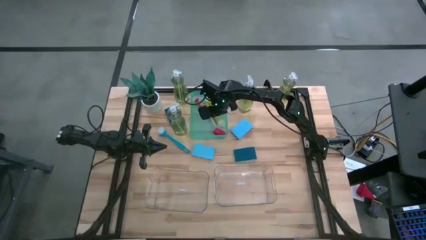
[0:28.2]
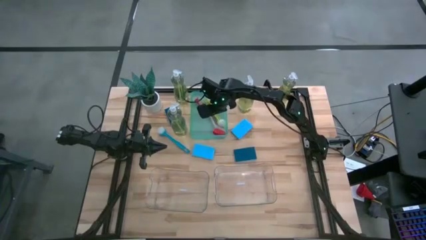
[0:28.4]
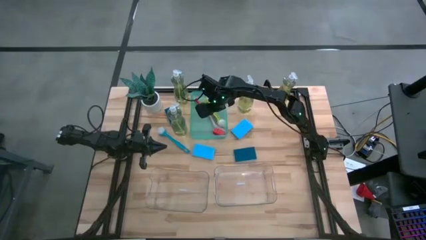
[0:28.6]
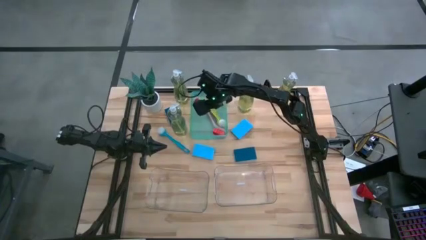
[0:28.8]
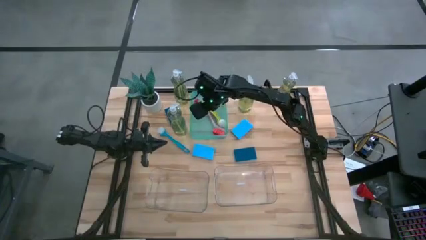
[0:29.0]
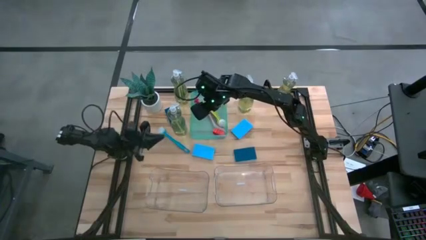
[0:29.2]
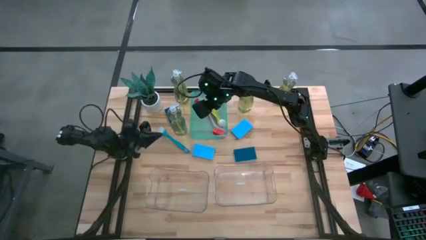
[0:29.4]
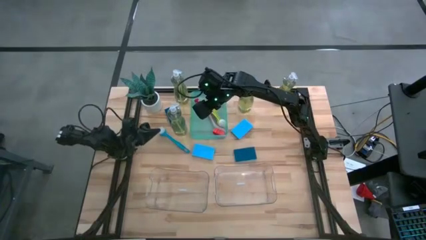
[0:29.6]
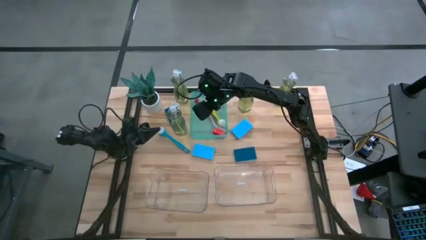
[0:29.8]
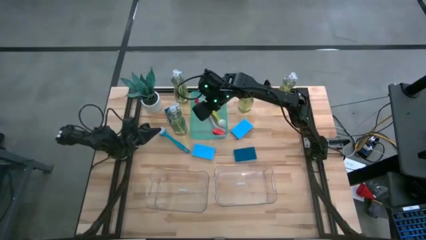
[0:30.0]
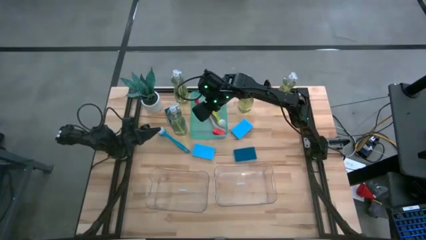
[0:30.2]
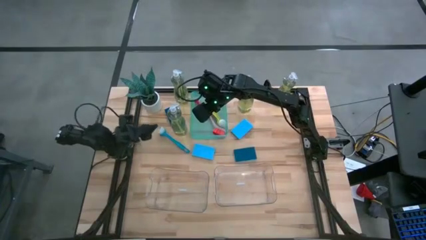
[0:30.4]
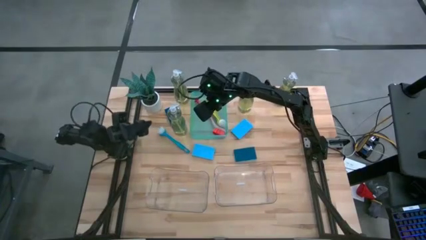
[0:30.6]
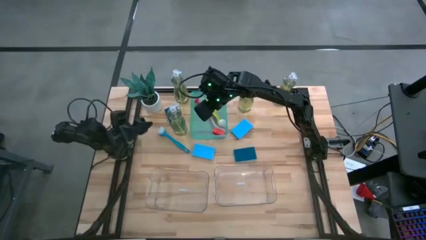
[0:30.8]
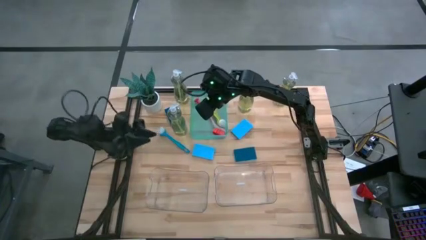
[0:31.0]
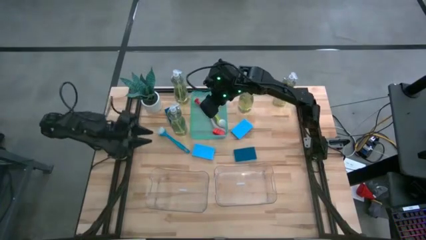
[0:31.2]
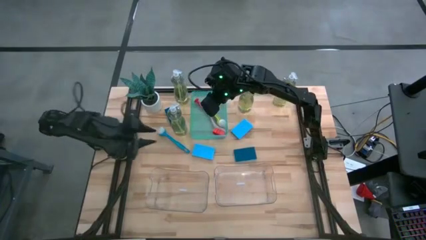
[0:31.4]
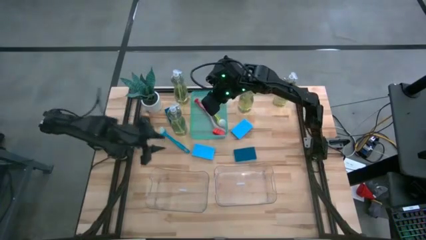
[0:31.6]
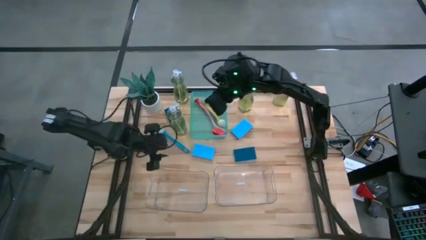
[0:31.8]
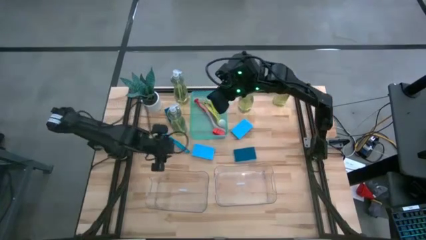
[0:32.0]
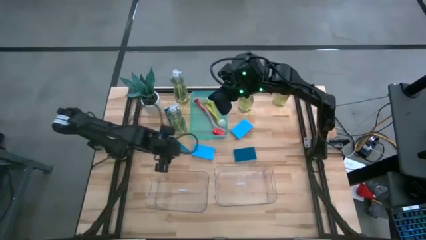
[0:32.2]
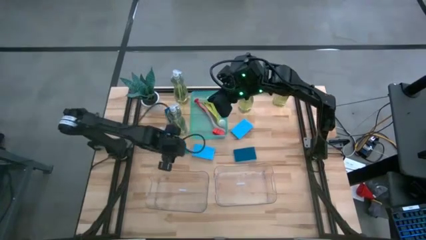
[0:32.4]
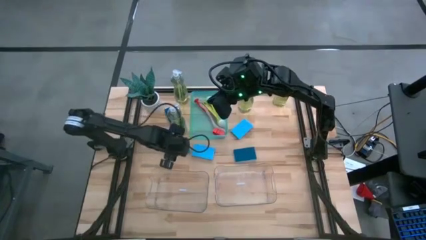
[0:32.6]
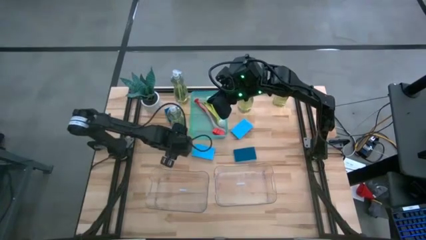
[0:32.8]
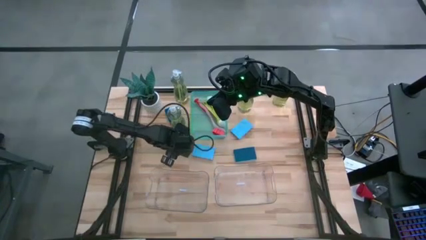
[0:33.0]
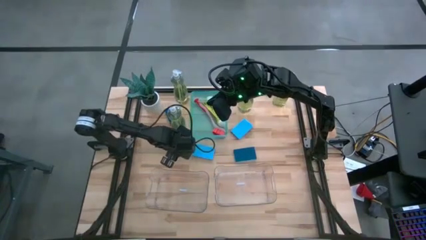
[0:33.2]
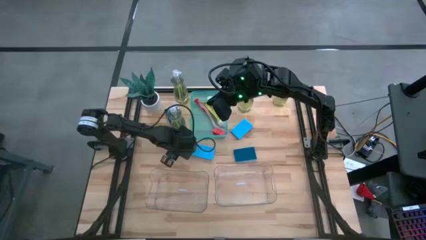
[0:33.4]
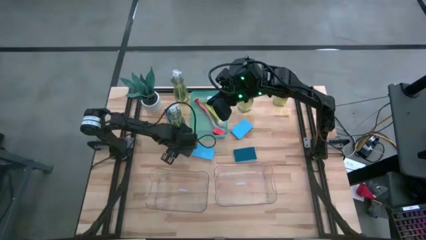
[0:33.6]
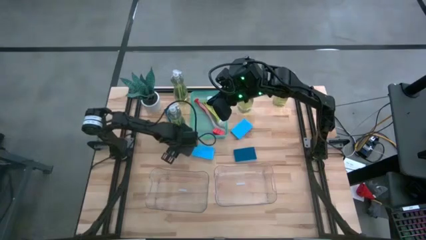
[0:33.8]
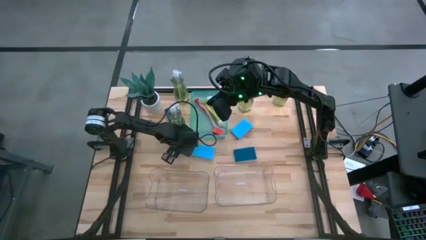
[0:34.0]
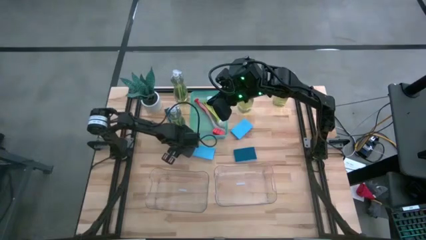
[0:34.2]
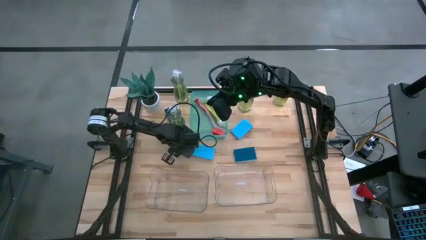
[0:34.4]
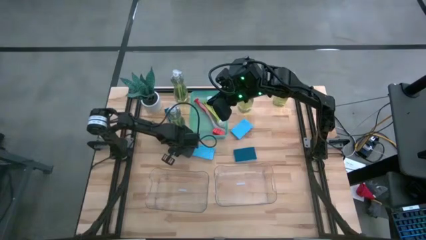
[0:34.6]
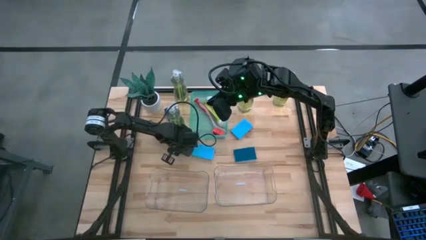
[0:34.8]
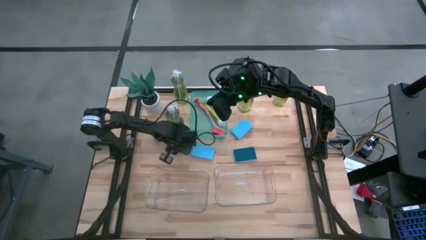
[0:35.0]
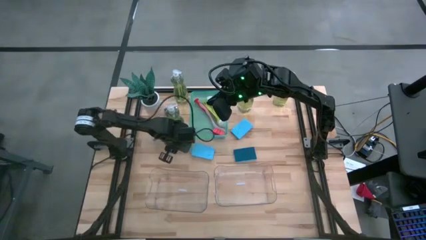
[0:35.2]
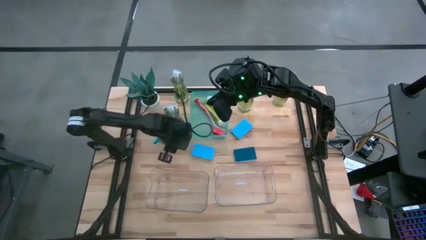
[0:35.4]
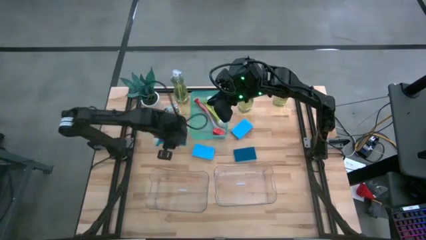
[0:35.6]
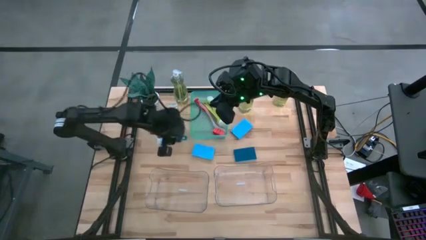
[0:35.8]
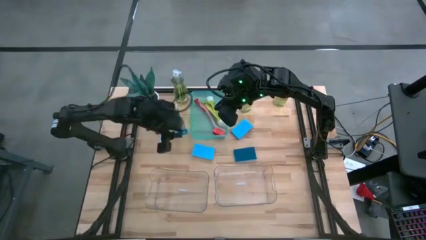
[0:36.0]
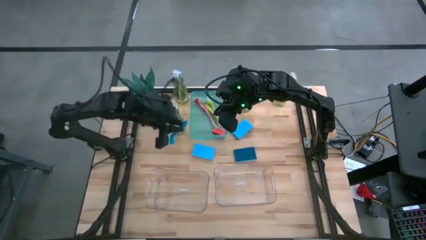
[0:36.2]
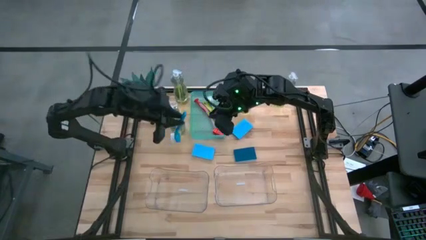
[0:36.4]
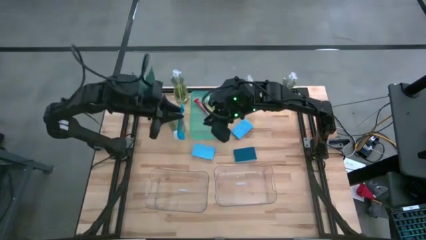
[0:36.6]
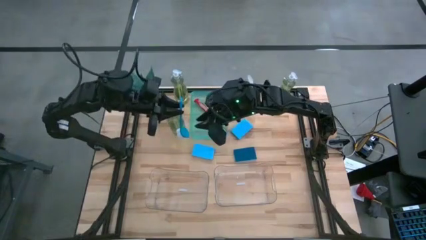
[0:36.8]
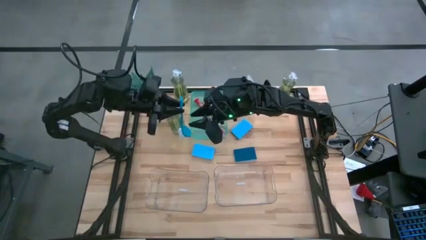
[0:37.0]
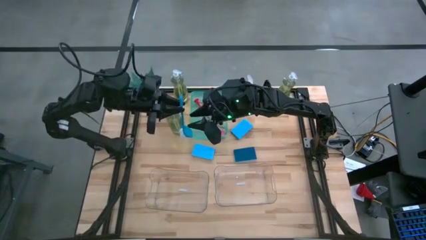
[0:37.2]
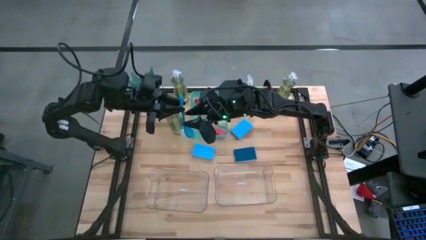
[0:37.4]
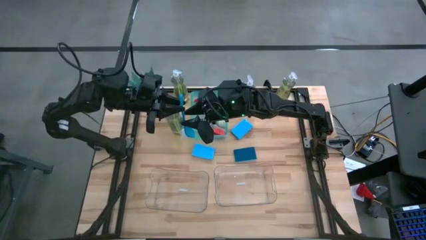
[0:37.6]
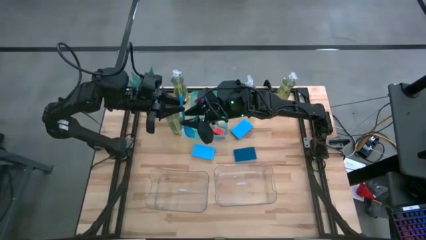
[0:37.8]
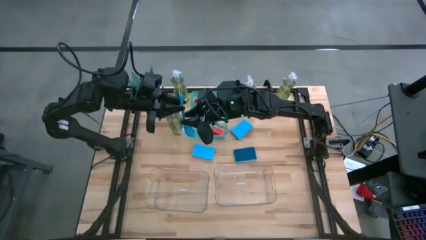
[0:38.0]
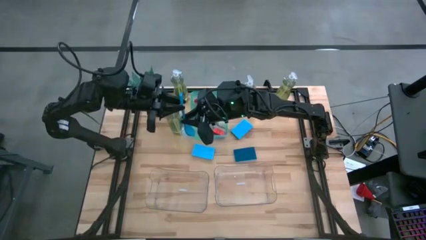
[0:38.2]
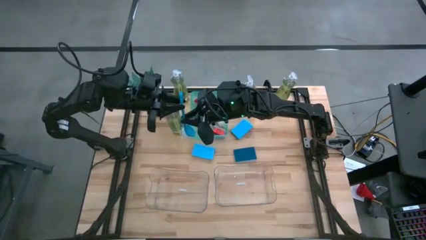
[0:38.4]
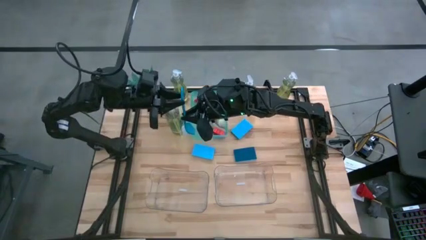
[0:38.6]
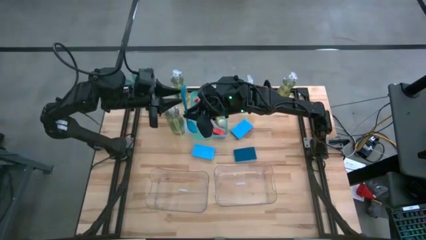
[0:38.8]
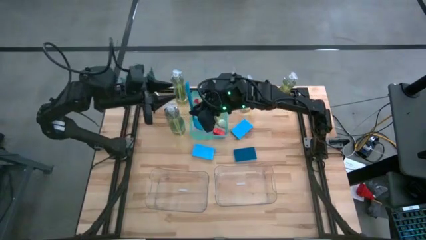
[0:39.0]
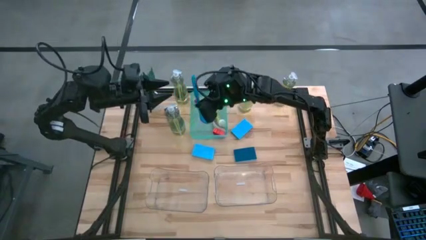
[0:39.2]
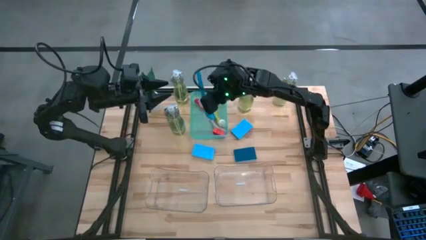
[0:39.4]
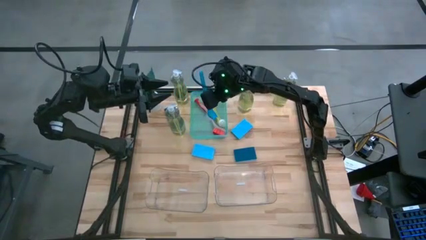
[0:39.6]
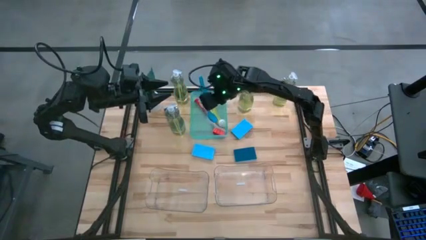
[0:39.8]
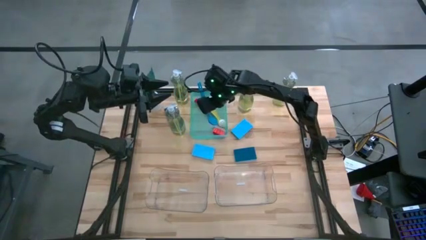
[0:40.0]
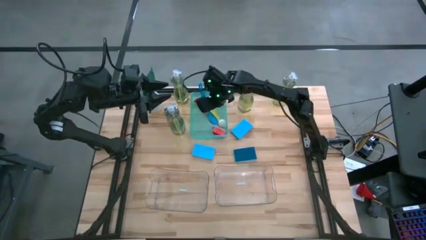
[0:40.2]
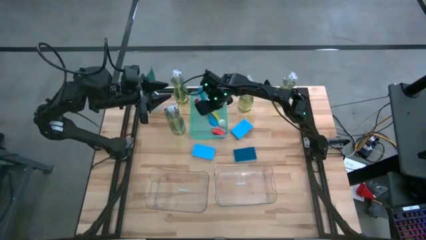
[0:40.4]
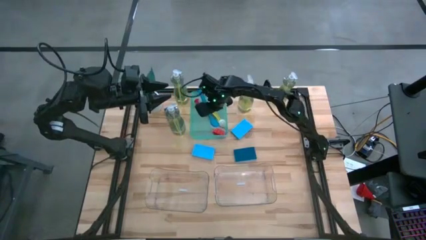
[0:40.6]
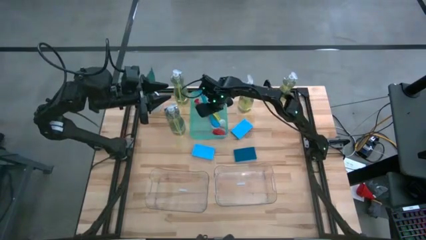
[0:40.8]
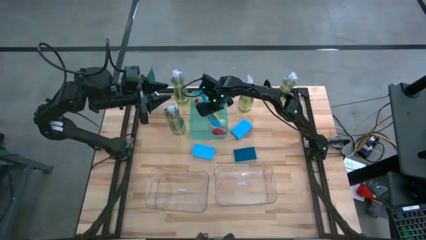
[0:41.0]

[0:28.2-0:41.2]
Task: Pick & Place Kitchen Sink Supplies
Put the blue dish brush into the green bin

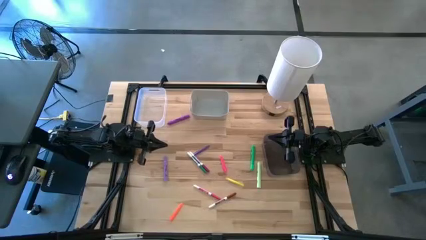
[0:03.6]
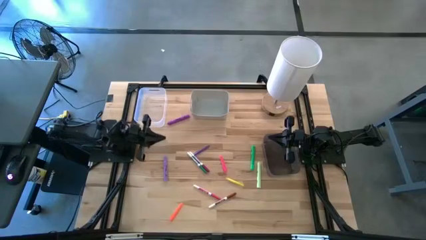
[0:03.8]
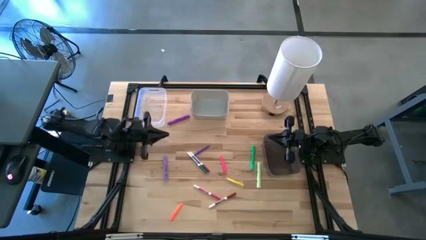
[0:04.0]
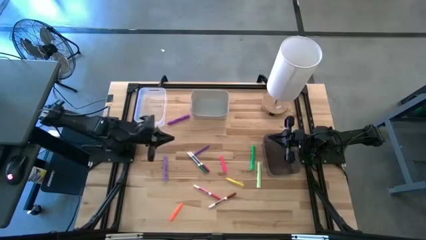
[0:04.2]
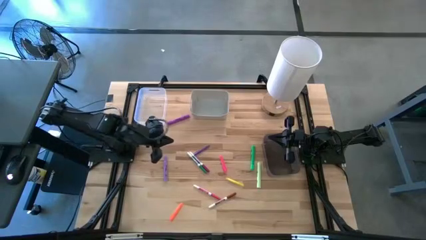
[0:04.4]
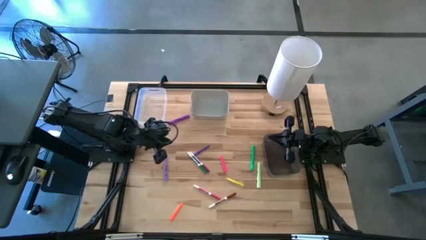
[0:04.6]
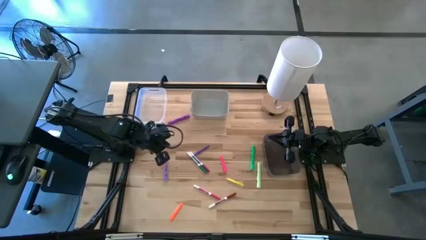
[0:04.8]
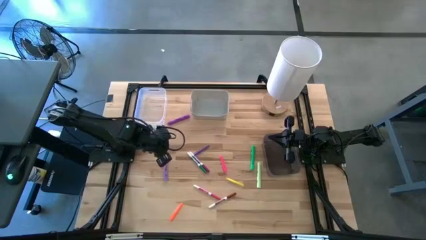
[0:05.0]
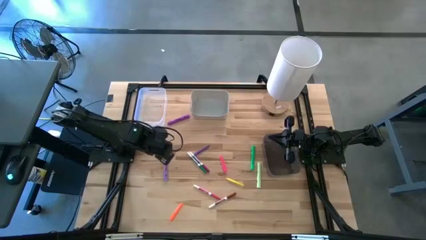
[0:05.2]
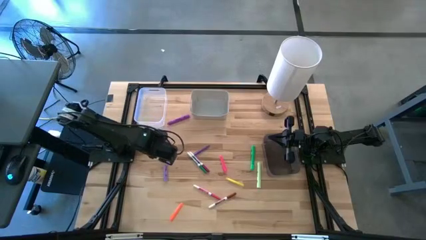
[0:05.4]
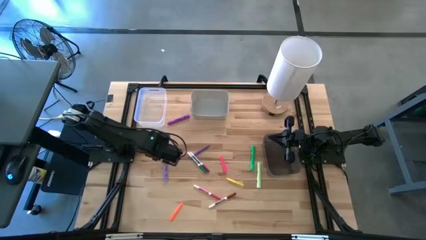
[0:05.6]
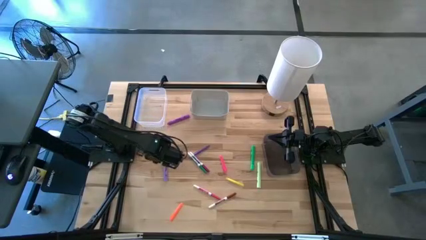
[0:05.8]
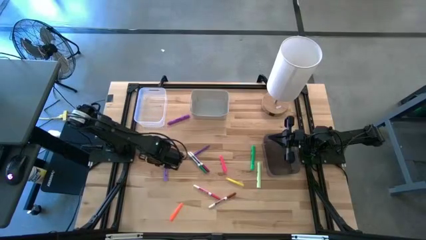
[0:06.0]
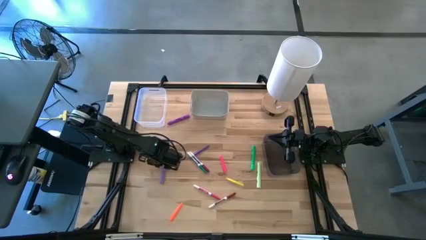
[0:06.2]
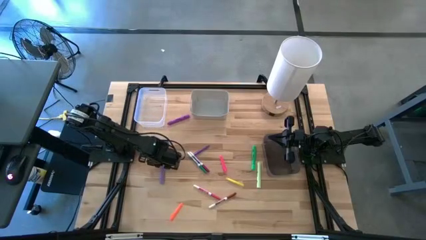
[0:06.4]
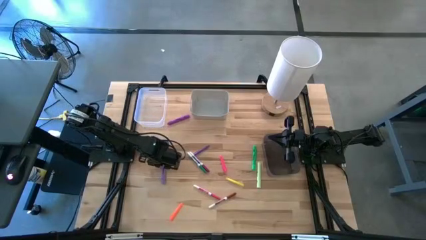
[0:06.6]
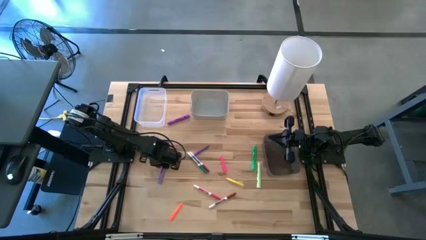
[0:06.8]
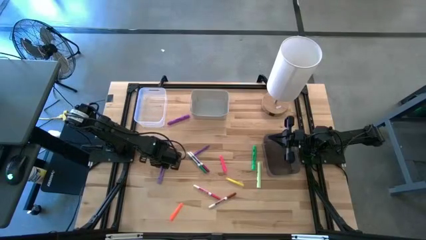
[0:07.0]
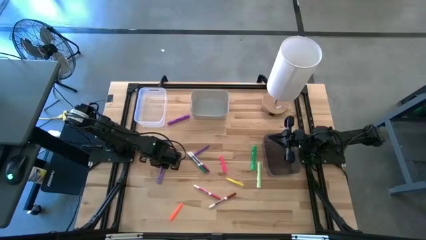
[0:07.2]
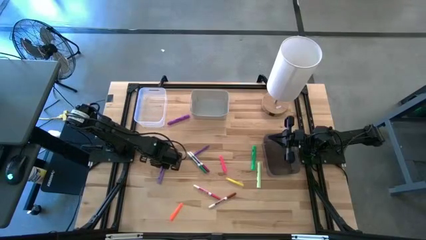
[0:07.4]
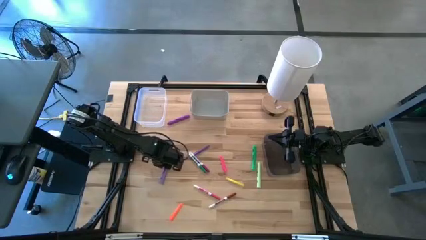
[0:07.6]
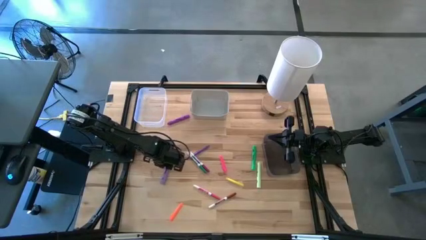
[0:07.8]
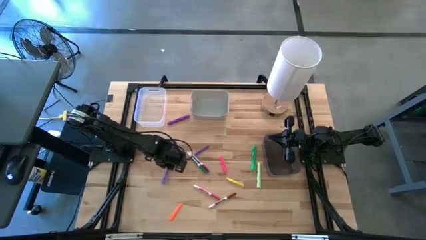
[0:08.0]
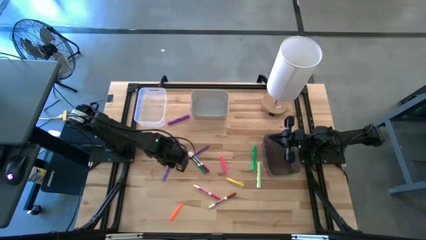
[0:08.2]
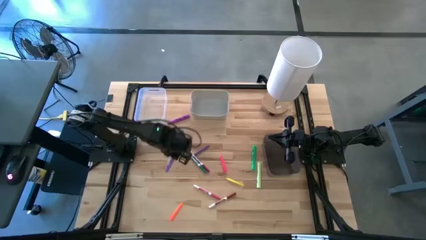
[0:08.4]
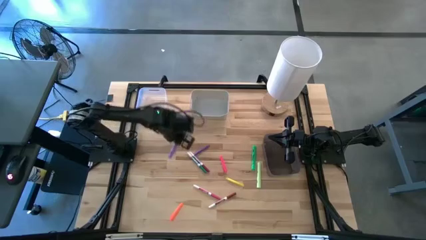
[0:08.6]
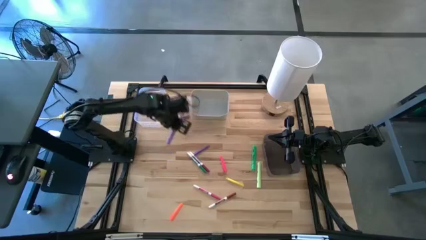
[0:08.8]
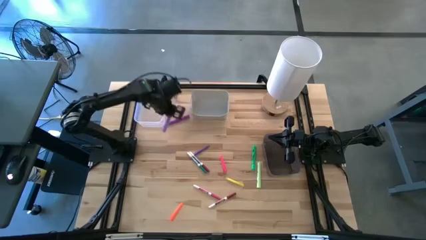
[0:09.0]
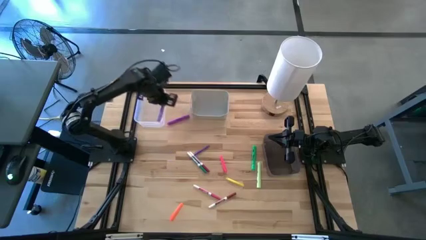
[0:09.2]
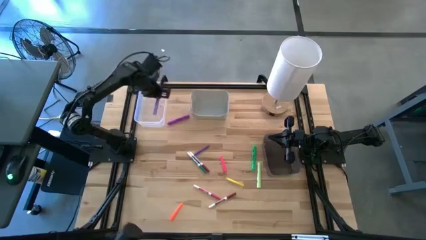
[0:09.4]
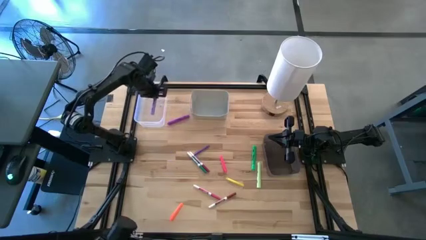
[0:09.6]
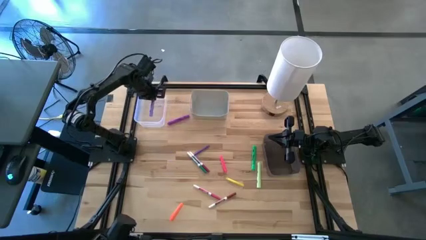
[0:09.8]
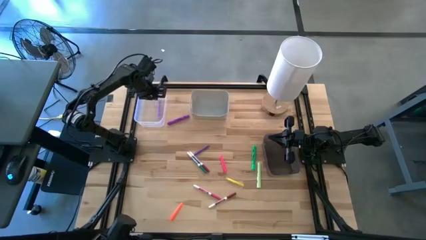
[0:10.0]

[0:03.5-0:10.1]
Task: Pick & Place Markers
Put the light purple highlighter into the transparent bin
